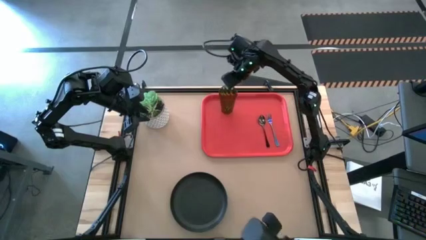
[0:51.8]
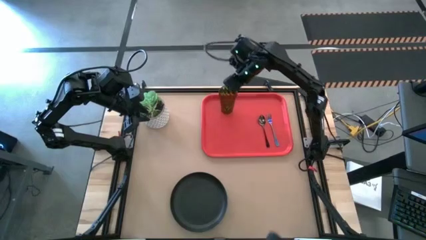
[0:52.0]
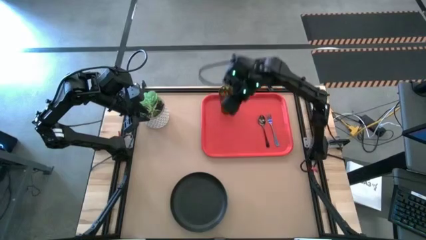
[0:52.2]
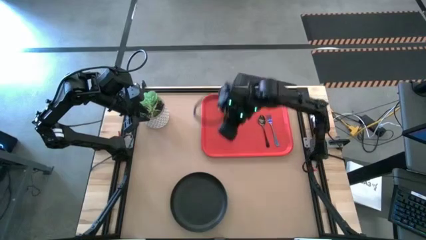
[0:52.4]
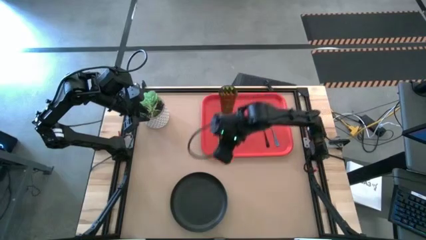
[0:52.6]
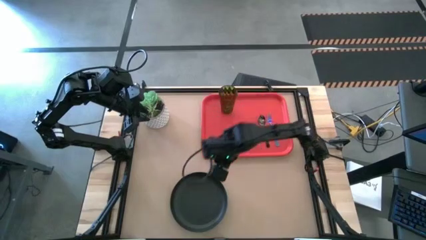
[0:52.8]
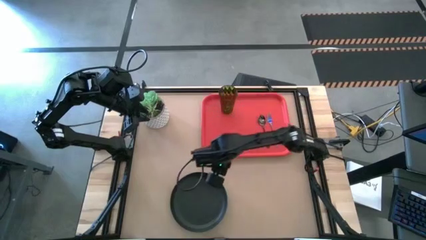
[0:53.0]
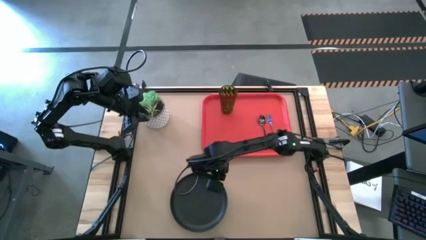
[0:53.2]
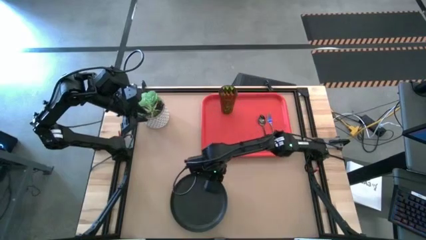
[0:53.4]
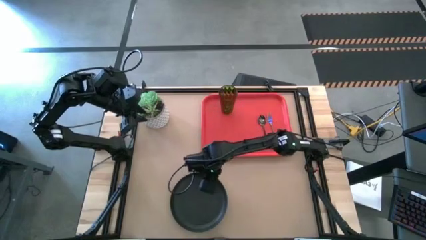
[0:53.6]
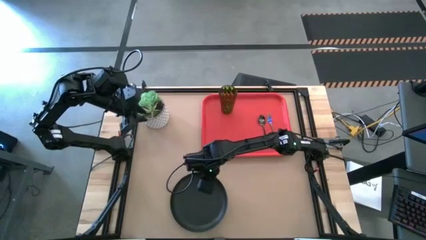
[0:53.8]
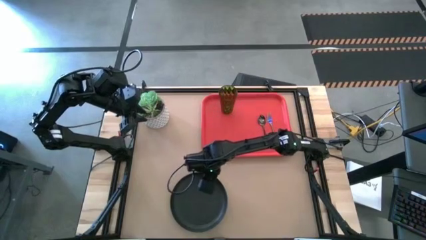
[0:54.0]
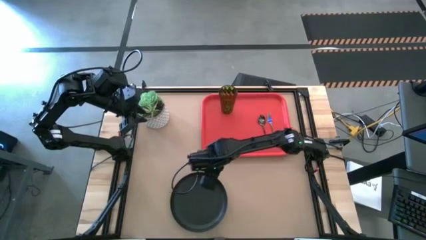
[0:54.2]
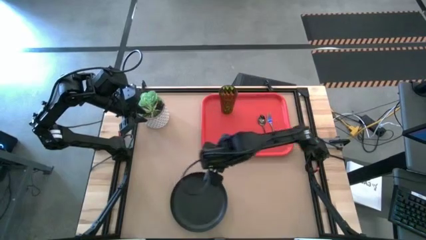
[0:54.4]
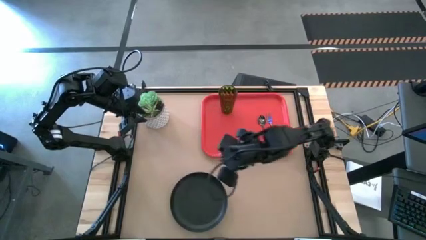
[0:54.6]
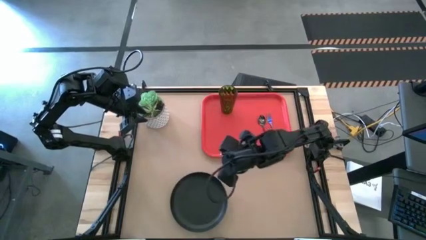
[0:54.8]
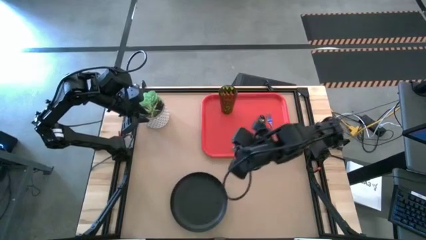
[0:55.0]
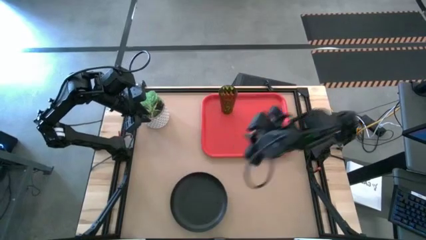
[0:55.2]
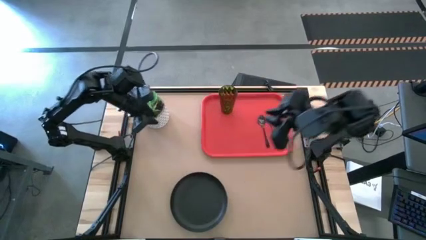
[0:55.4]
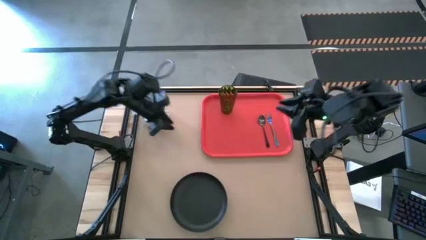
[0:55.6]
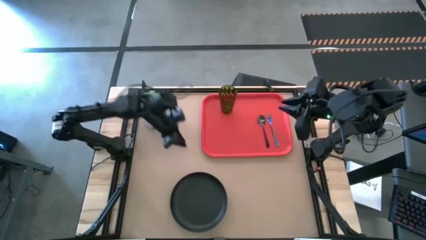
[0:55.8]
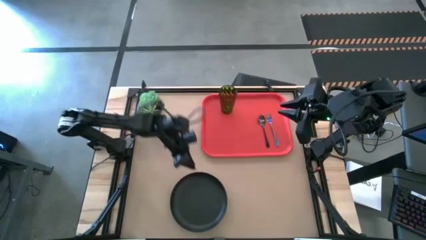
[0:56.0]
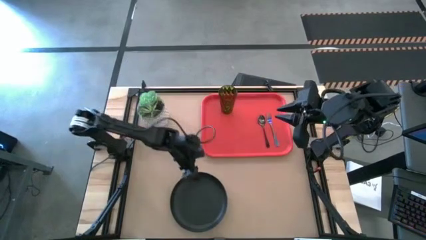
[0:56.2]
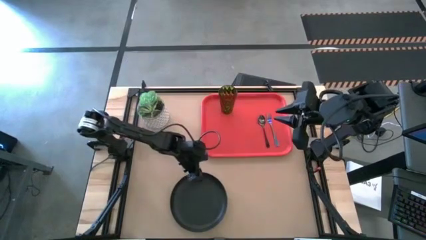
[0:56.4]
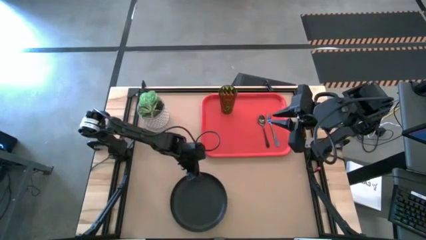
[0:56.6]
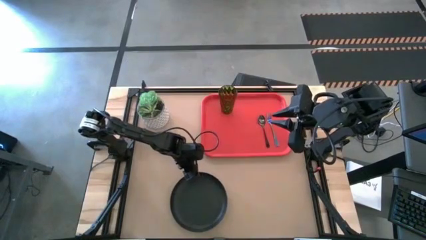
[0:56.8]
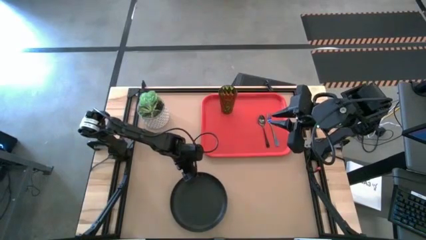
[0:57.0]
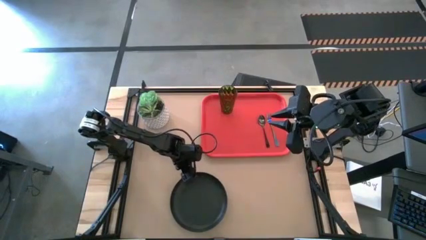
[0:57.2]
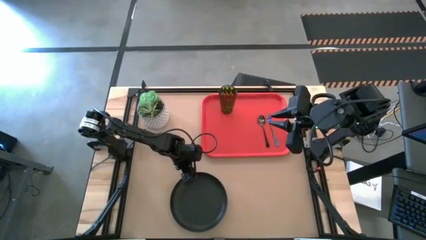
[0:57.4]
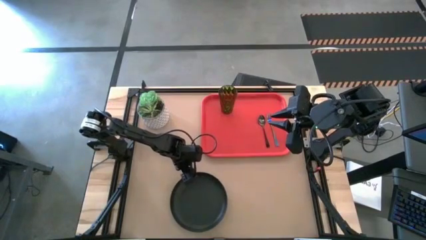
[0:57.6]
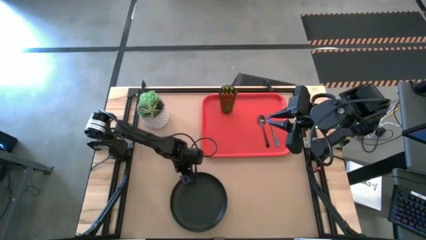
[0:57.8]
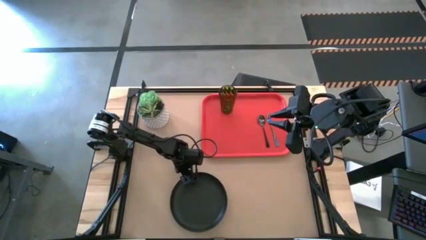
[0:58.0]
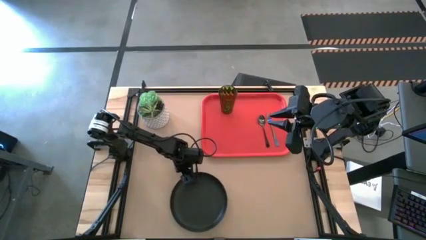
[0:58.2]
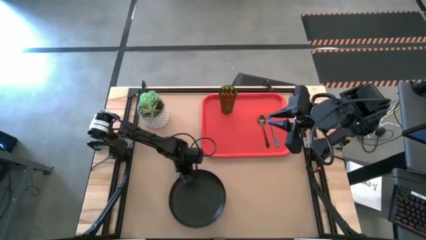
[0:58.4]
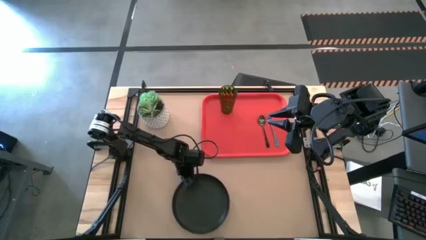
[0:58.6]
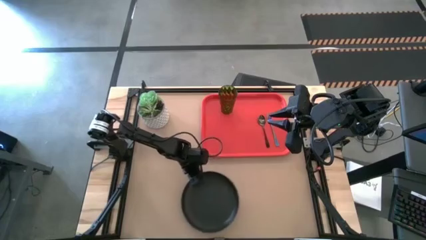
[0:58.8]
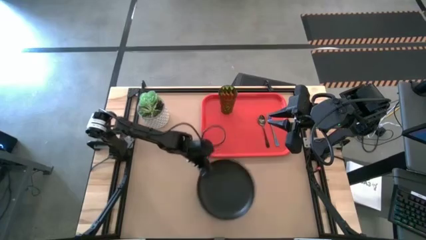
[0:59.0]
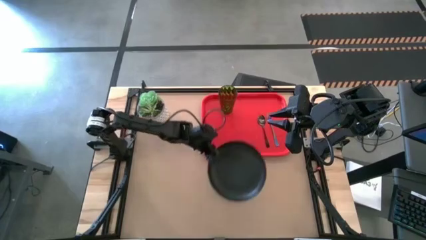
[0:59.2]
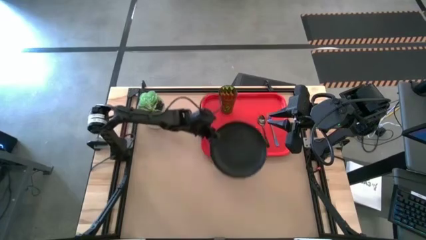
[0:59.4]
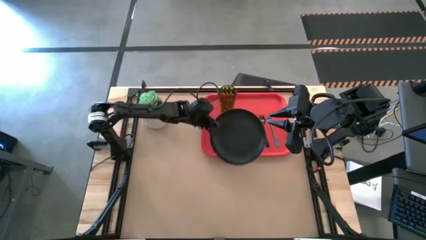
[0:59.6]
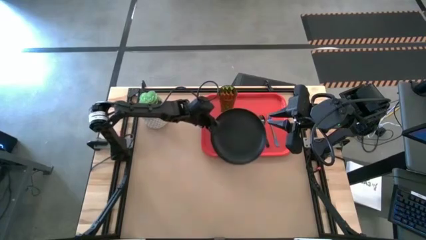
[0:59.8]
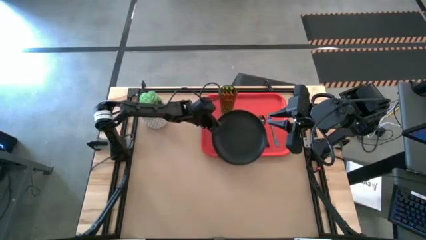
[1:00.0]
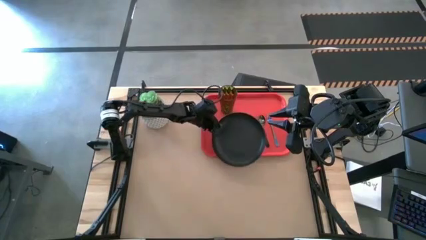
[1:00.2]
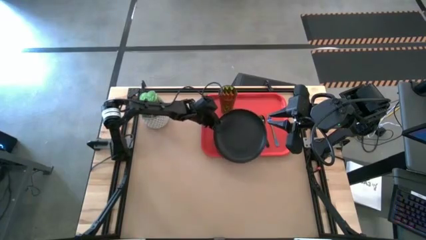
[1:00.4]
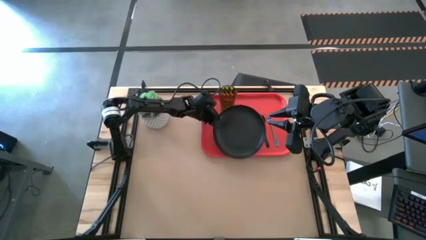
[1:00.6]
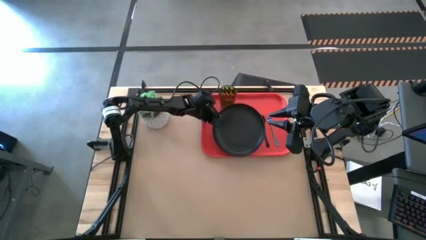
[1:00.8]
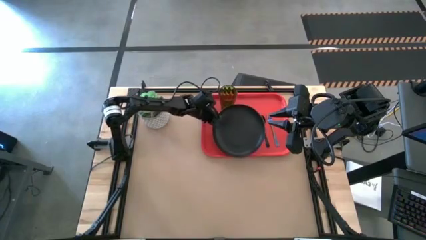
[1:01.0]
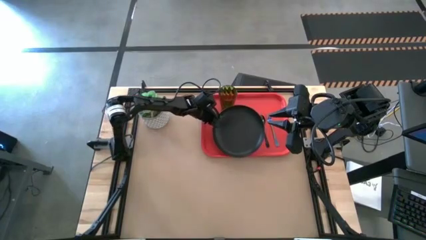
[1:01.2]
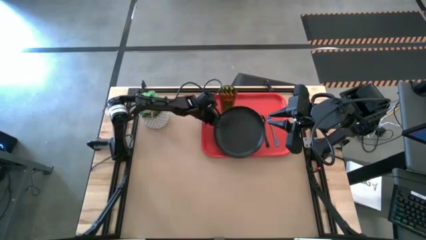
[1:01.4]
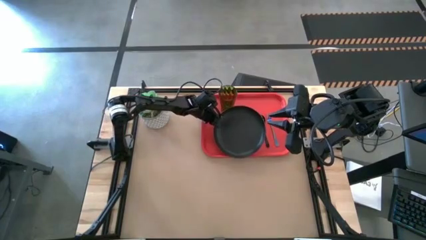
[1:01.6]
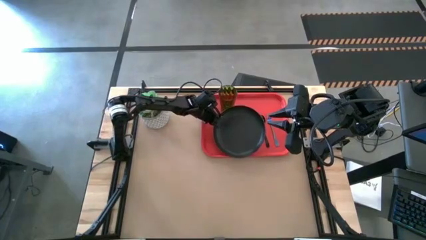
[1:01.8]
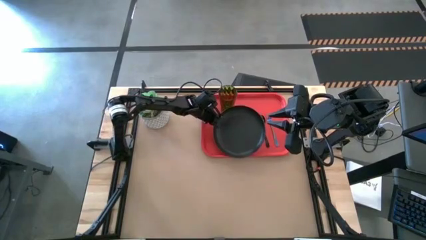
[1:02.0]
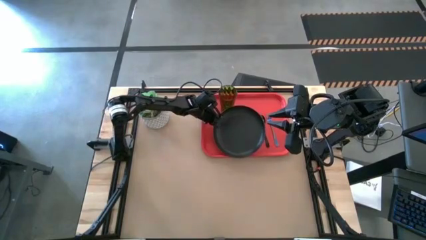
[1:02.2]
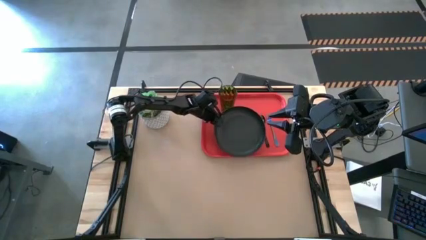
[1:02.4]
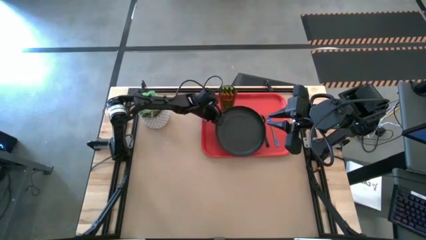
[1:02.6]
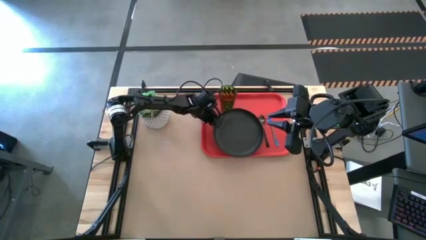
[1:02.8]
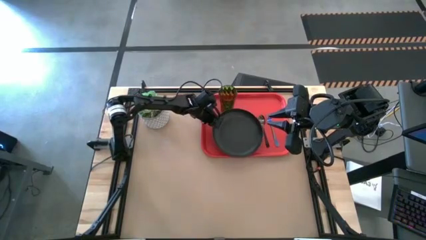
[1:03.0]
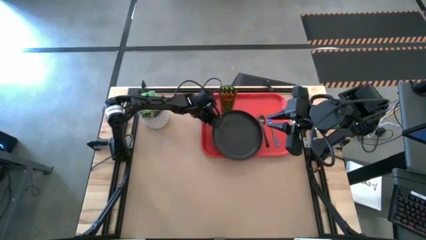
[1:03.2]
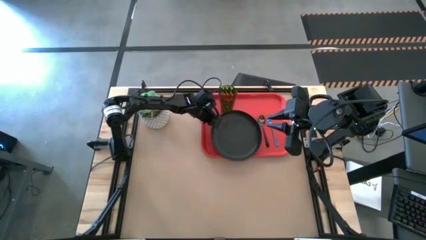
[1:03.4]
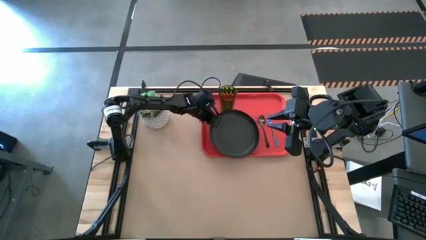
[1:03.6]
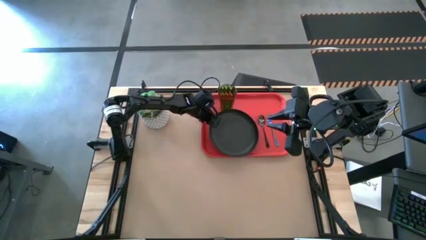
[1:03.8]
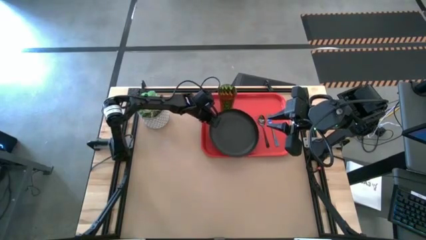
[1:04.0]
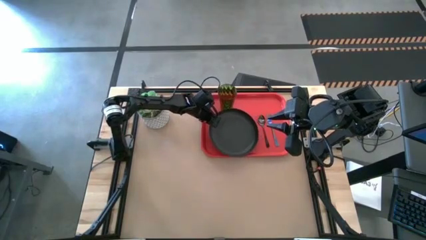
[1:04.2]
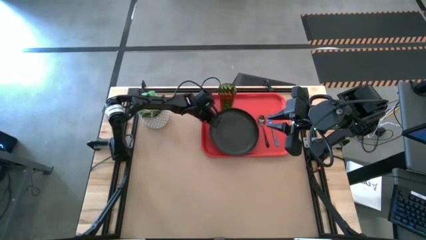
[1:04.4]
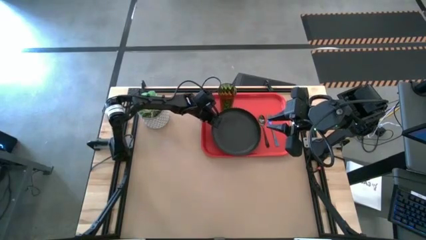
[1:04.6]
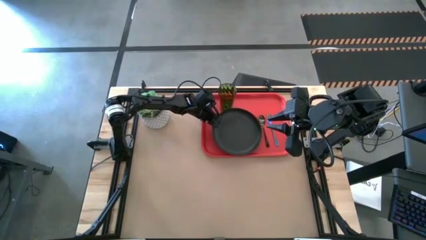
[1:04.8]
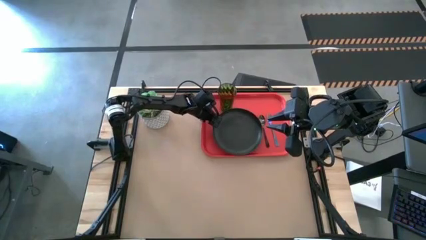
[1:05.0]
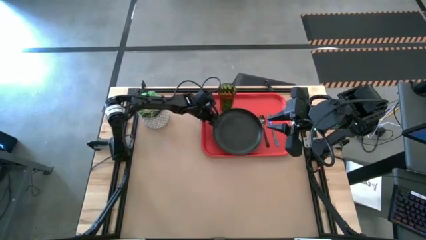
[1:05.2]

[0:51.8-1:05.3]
Task: Pick and place plate/cup/fork/spoon on tray
Put the black plate into the red tray
